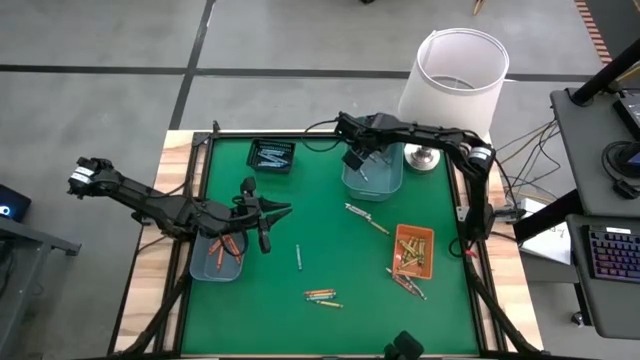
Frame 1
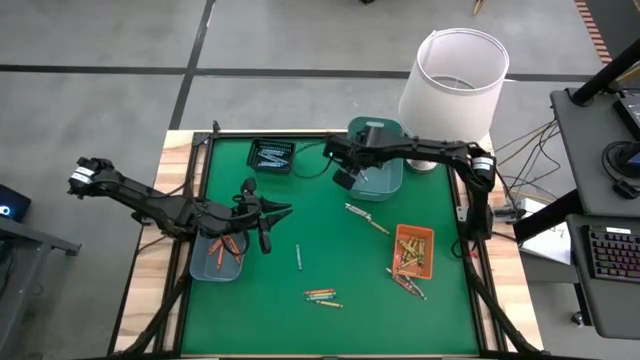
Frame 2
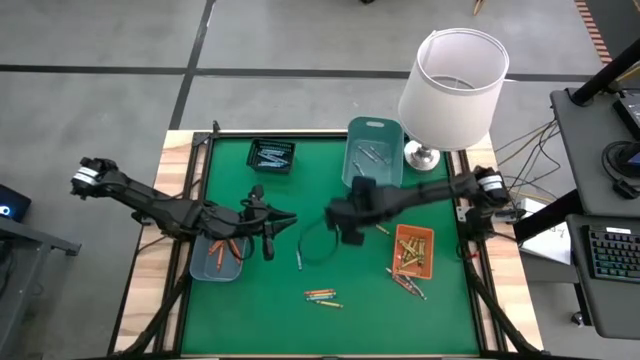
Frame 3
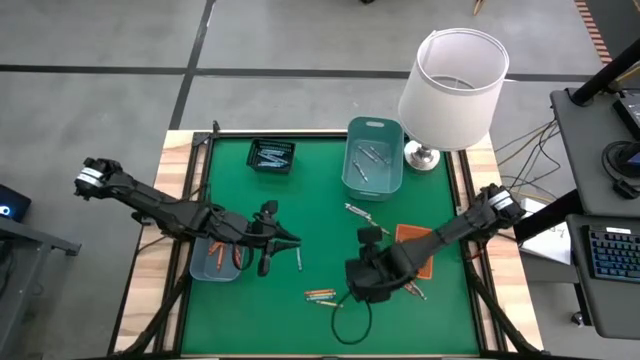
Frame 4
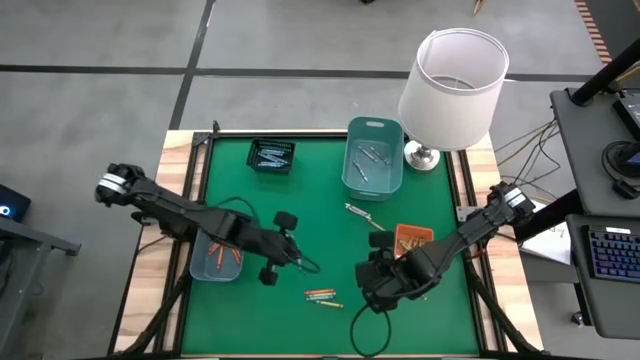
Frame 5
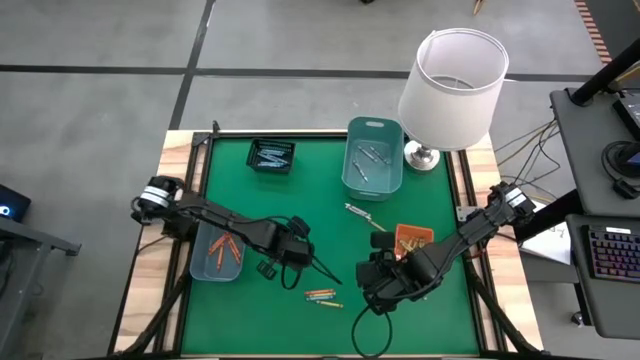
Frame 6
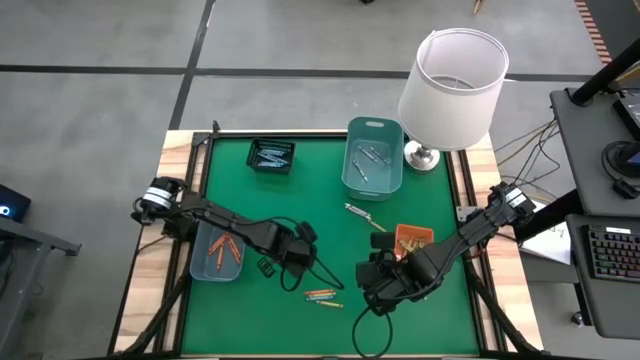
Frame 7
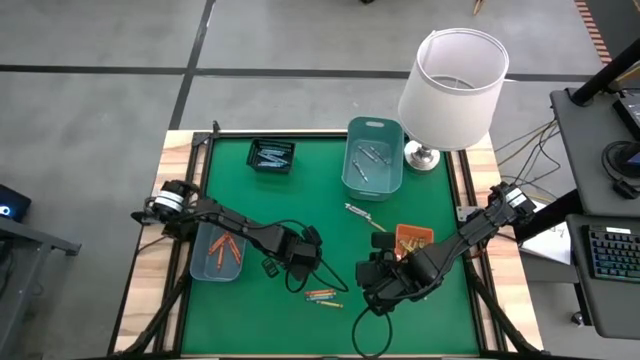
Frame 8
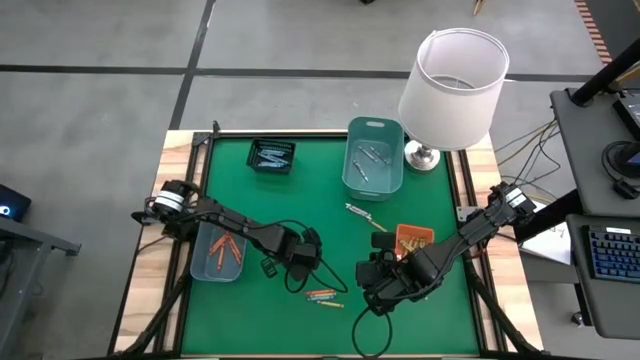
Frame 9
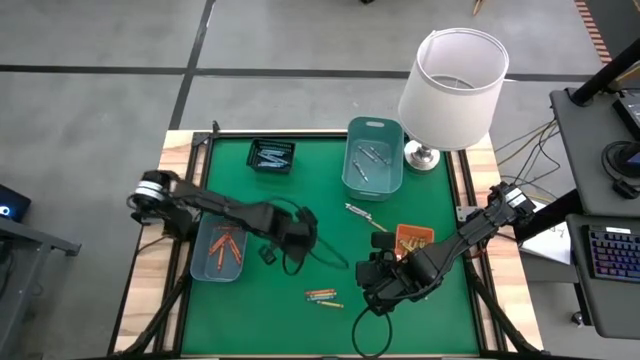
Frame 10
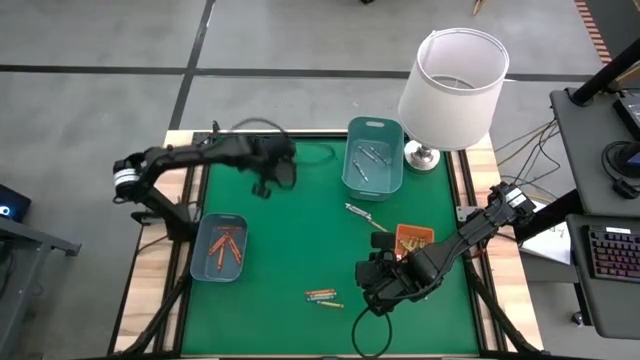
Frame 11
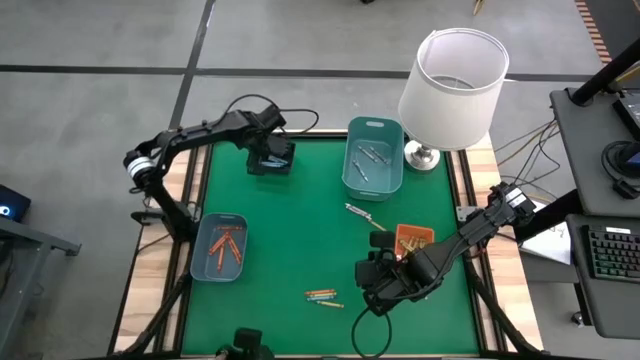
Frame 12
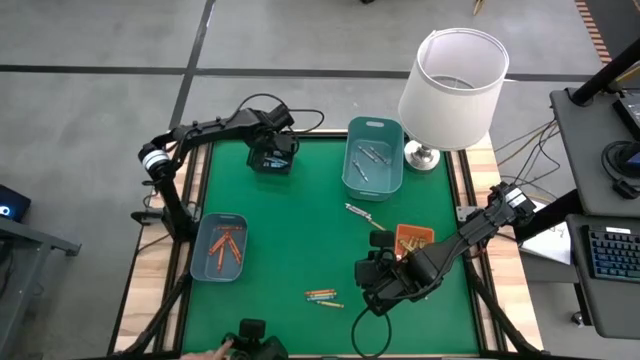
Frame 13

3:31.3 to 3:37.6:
Task: Sort crayons
Put the blue crayon into the black bin

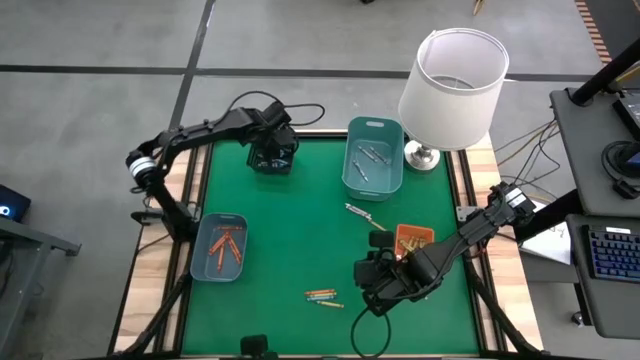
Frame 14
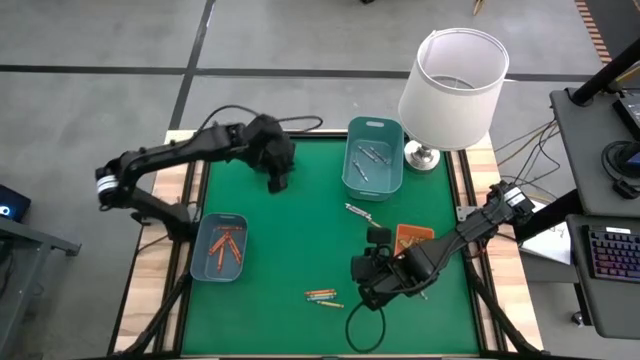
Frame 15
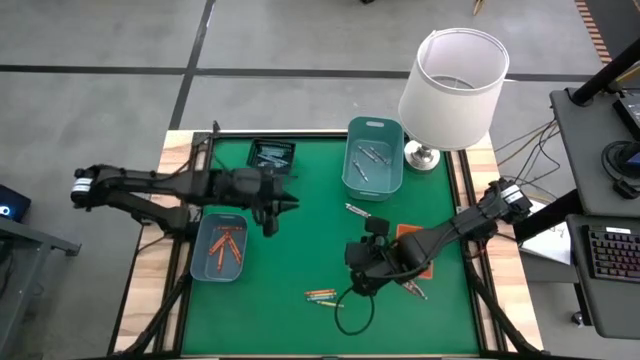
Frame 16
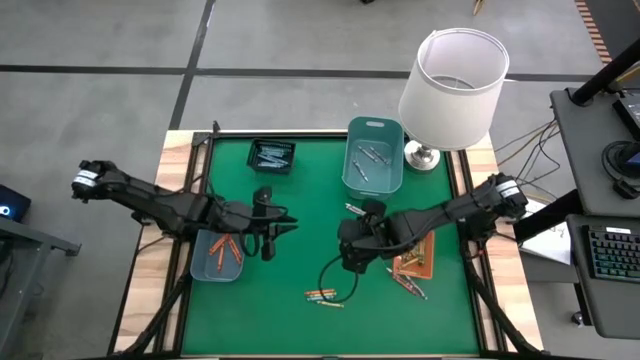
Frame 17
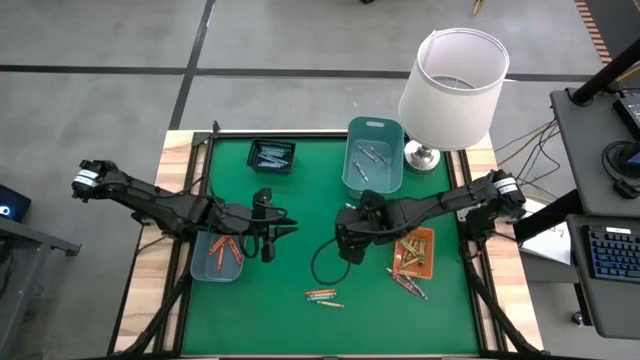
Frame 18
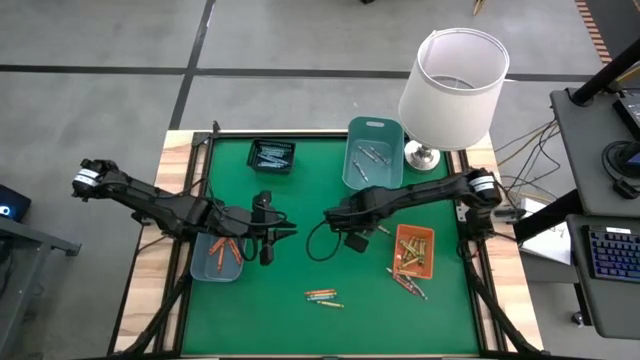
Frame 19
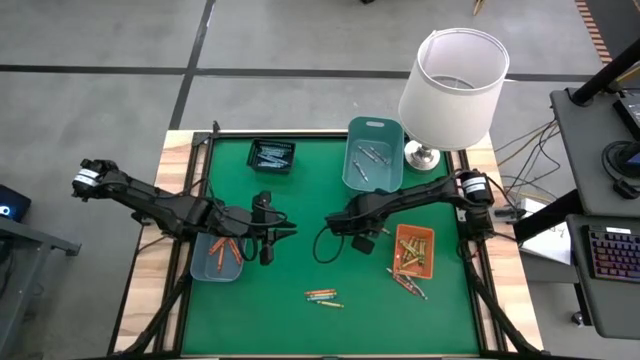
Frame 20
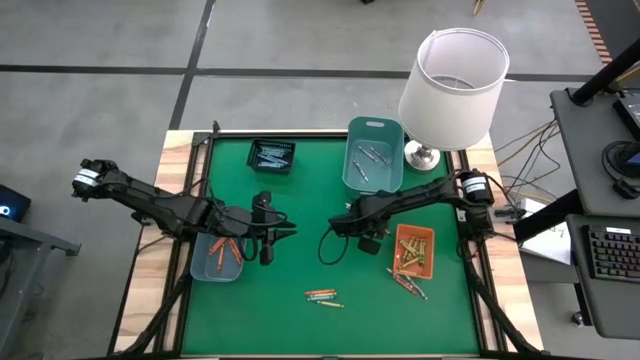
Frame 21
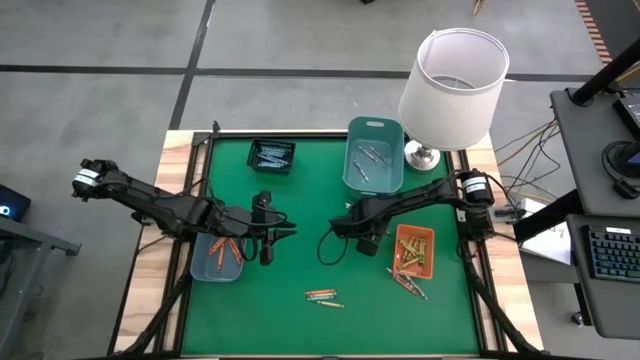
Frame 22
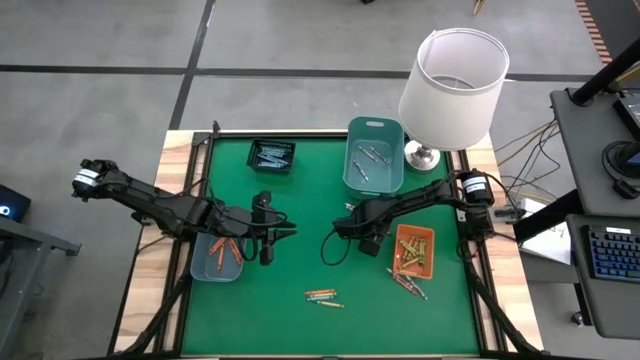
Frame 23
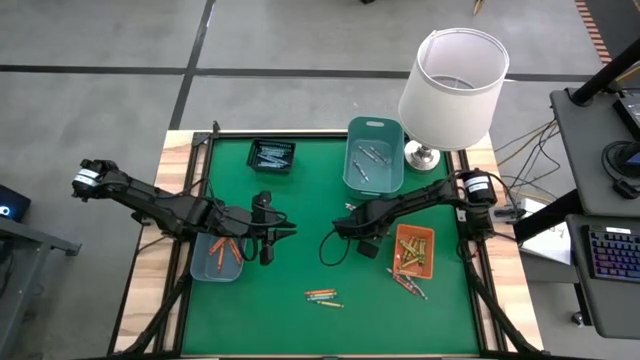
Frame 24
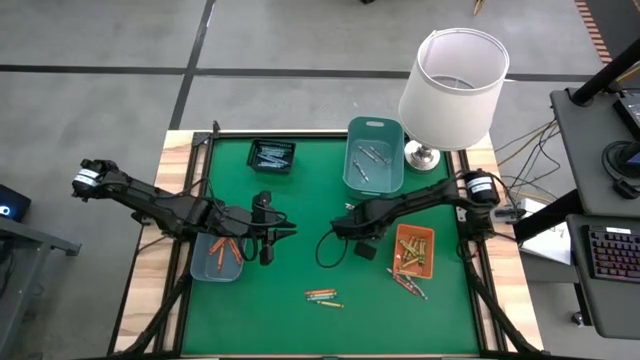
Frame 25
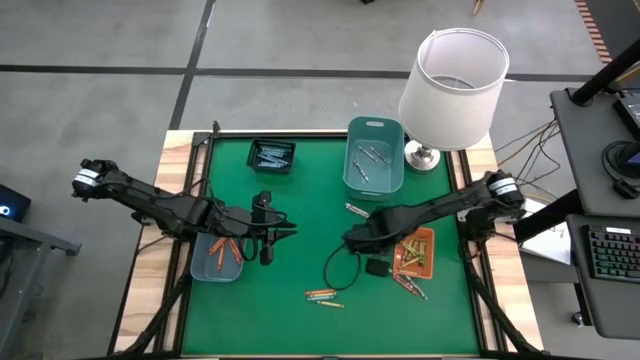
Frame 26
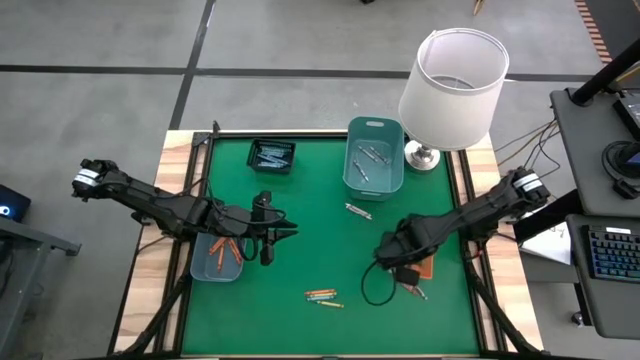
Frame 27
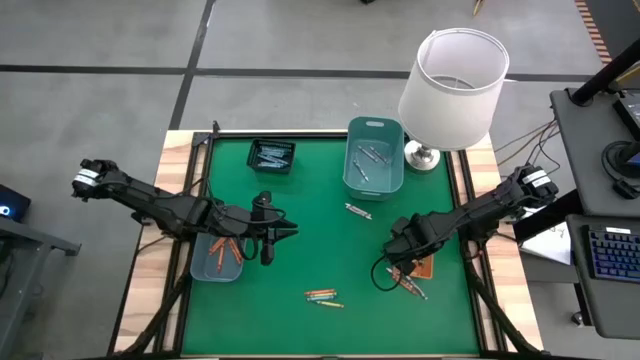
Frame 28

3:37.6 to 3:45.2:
Put the green crayon into the orange bin

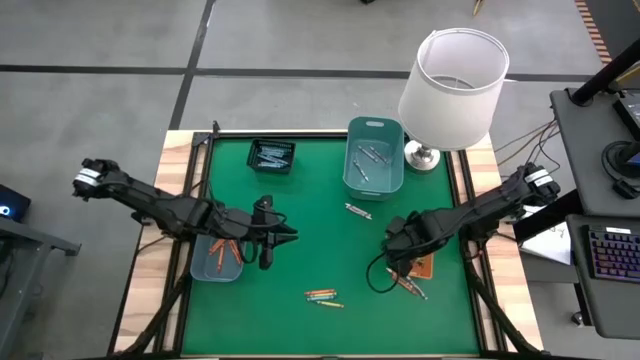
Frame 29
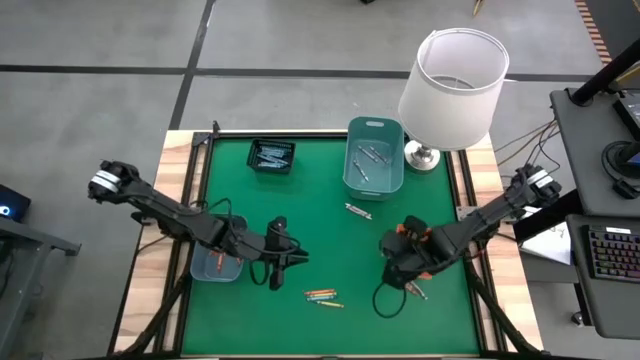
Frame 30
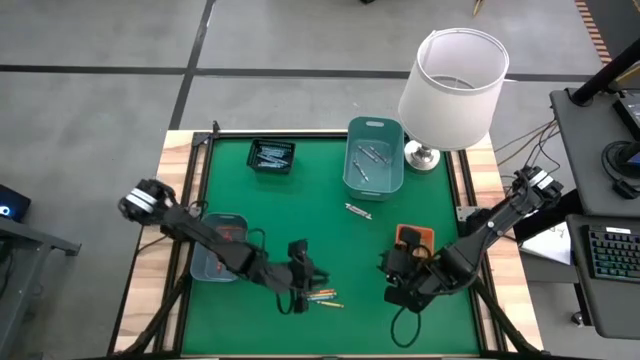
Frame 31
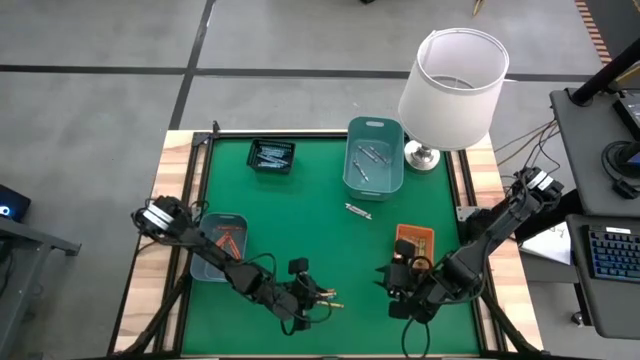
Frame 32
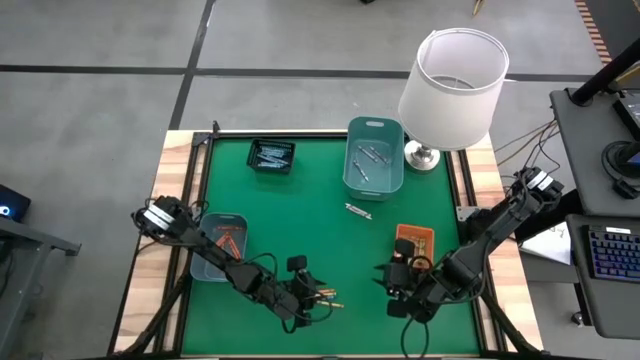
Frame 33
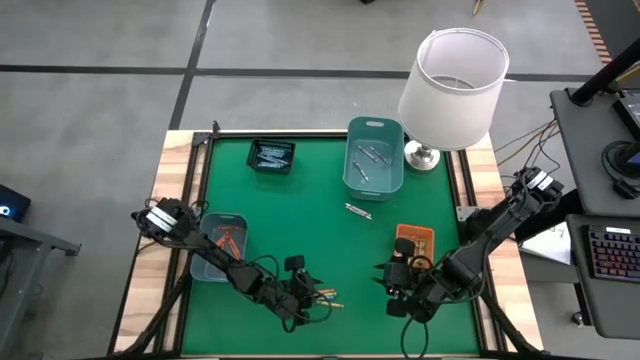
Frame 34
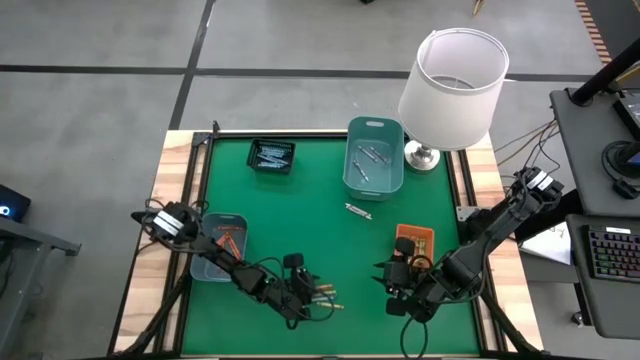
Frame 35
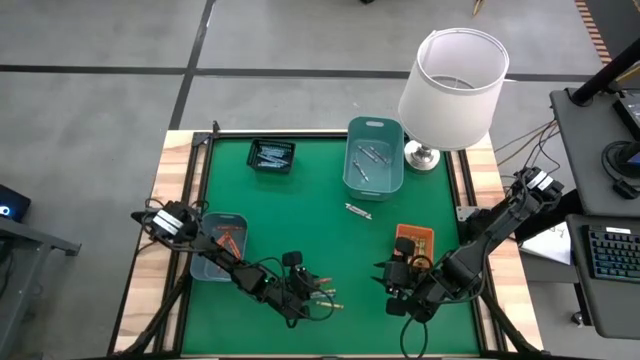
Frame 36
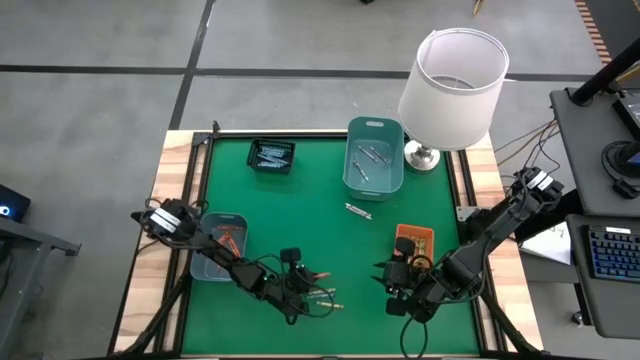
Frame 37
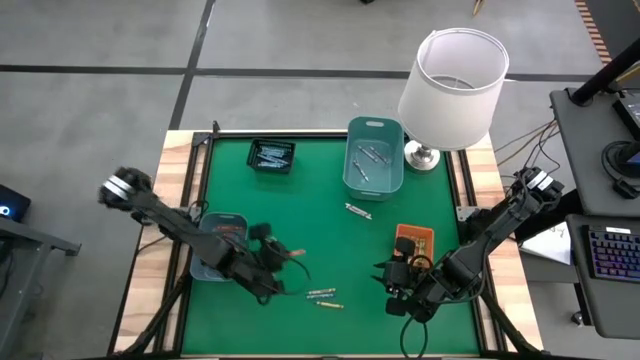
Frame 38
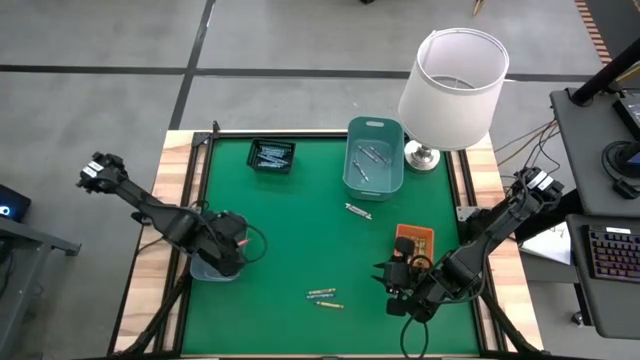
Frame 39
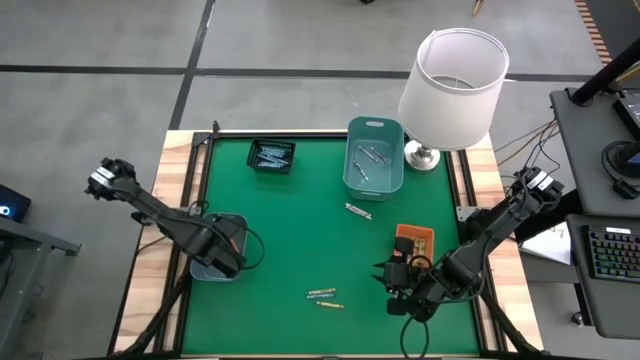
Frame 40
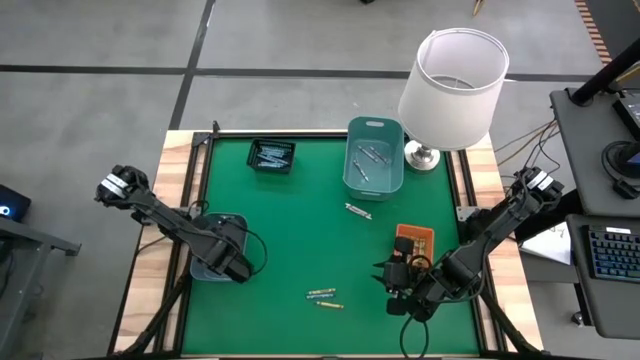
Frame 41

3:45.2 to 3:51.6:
Put the orange crayon into the blue bin
